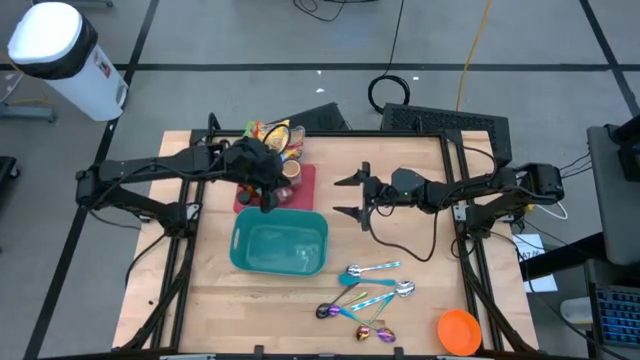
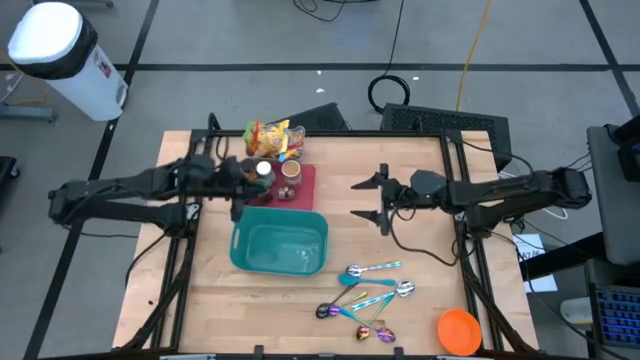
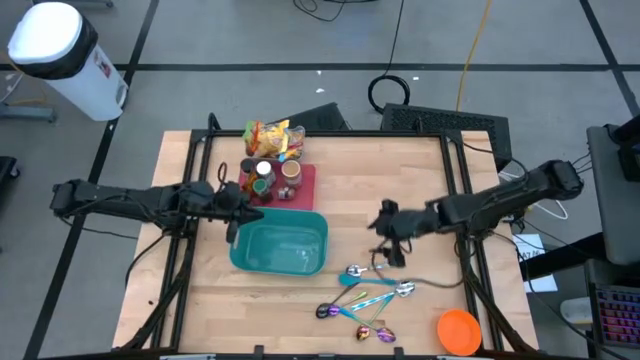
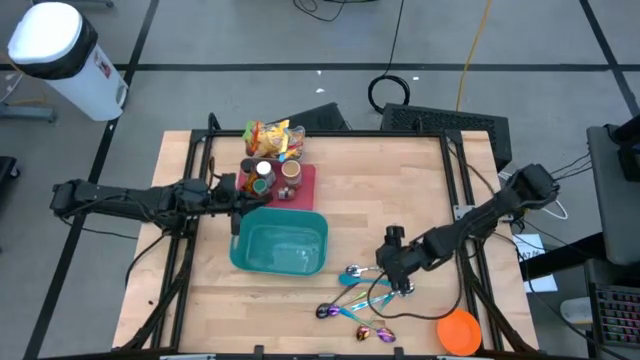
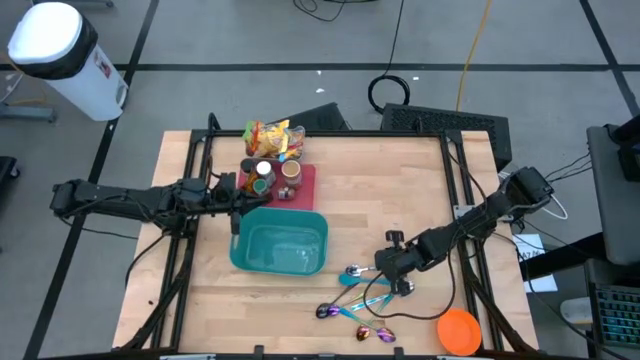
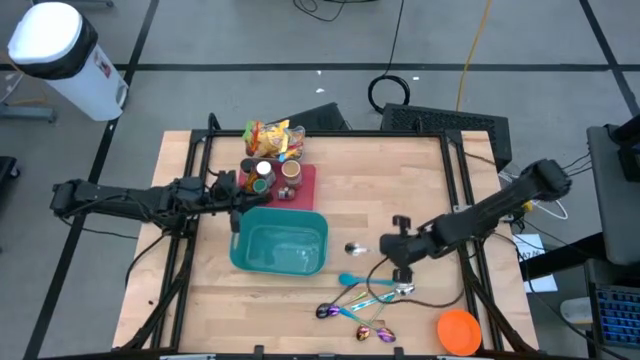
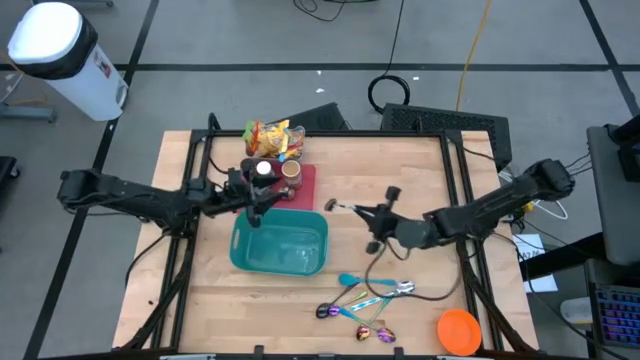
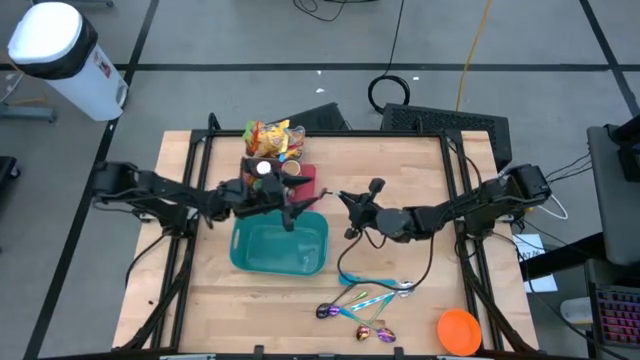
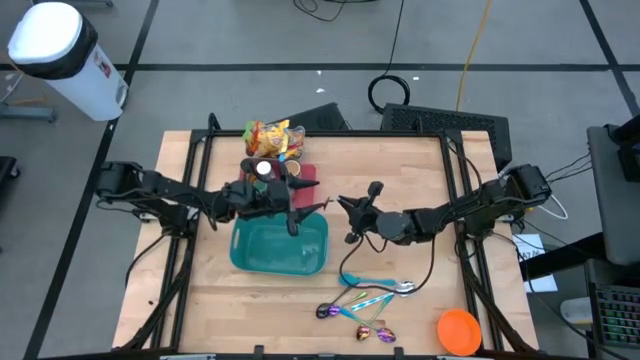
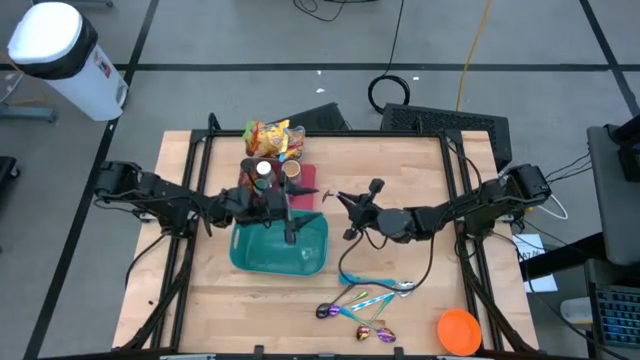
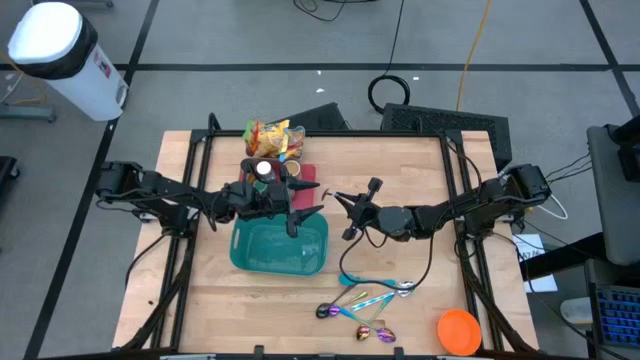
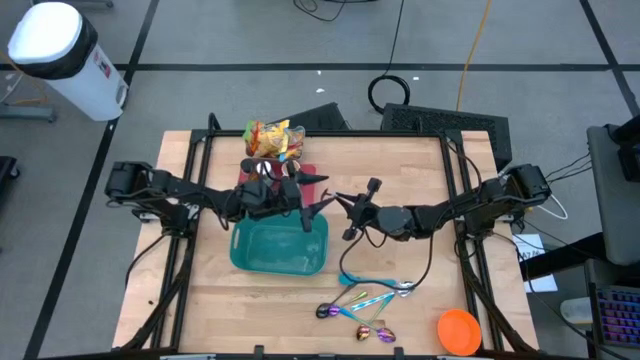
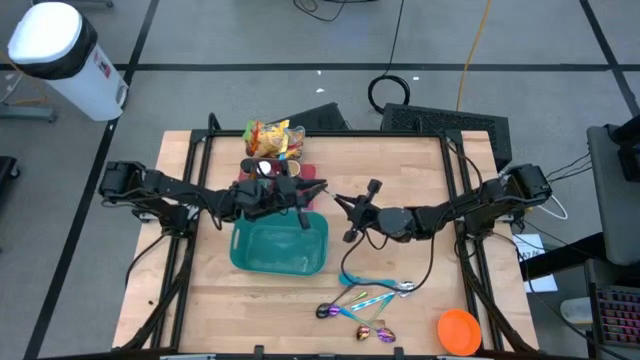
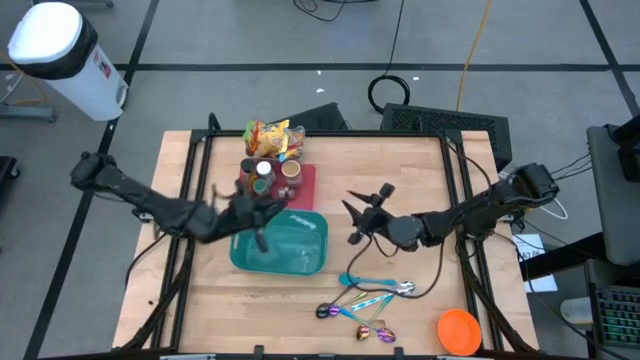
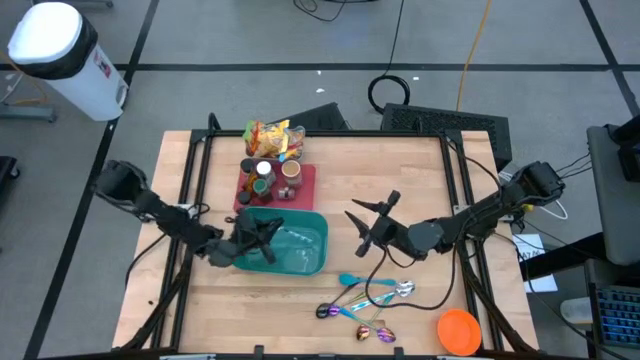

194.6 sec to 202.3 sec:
Task: Pick & Place Food Item
Put the top white and blue spoon into the blue bin

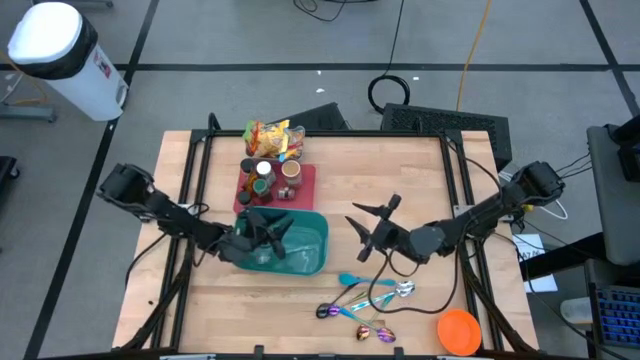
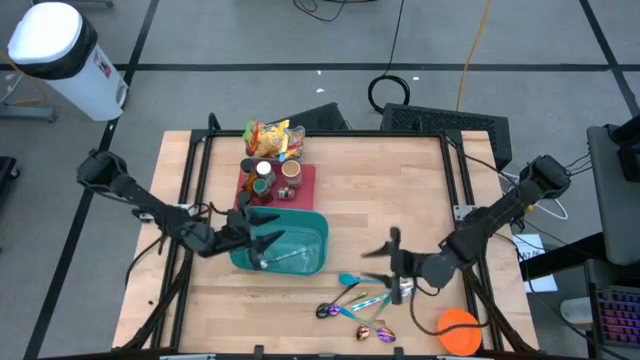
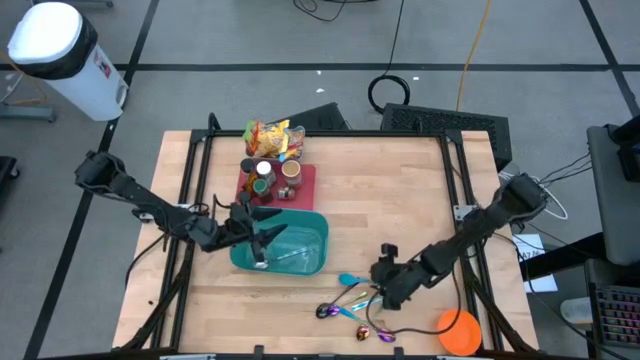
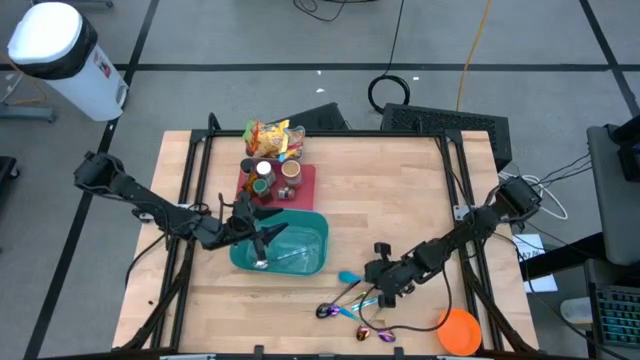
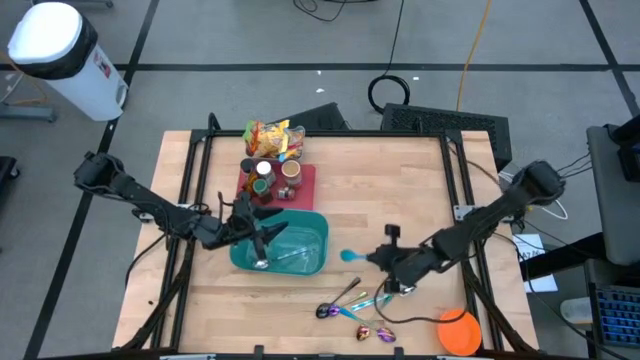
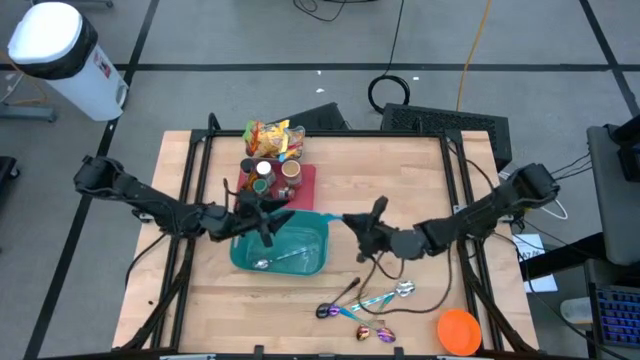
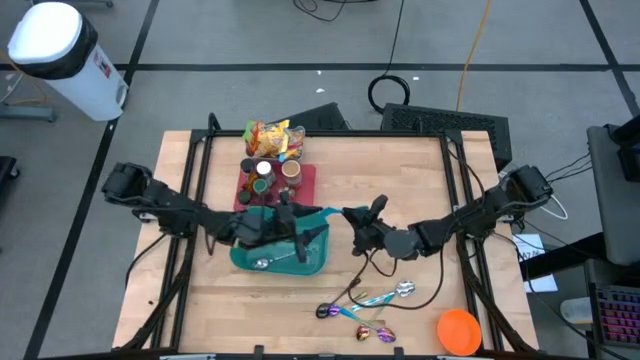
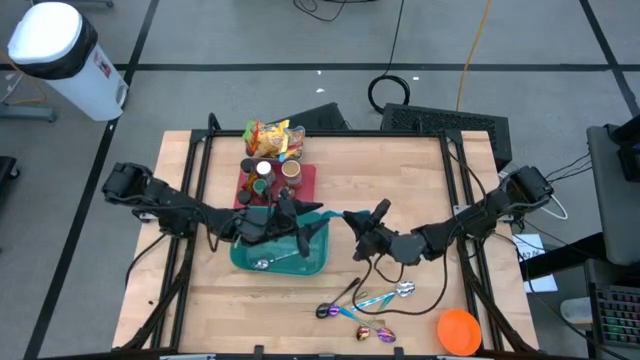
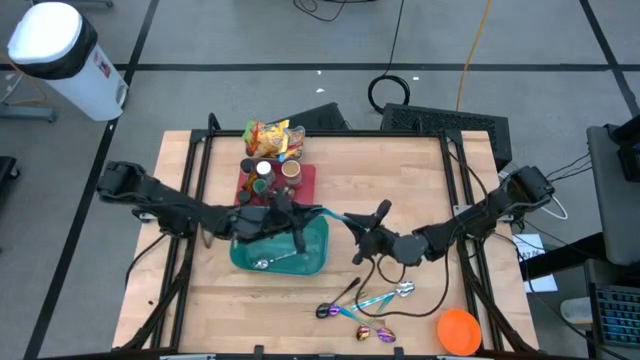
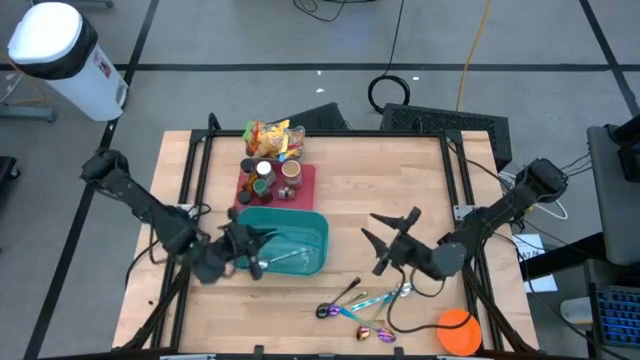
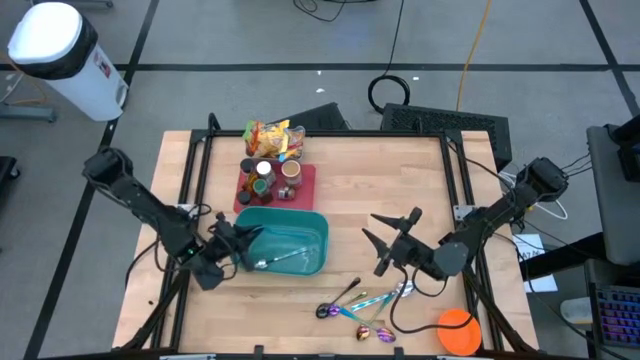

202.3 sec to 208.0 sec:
Put the blue baby spoon into the blue bin

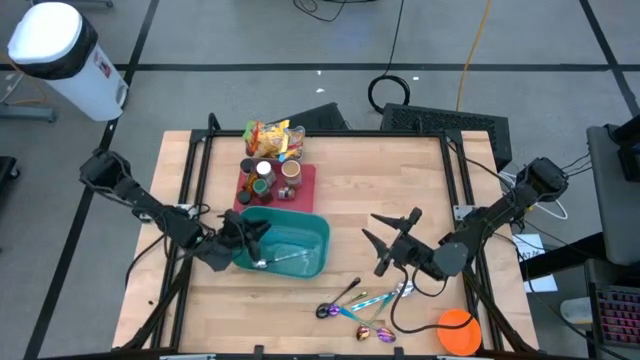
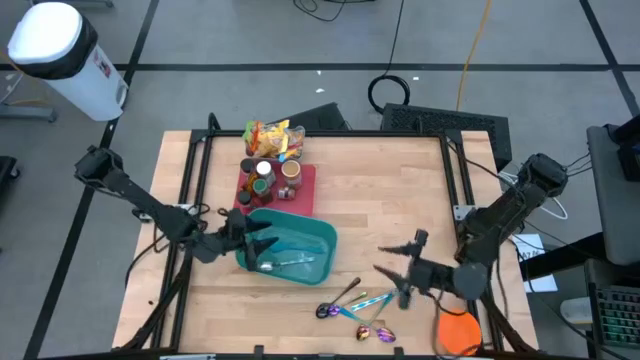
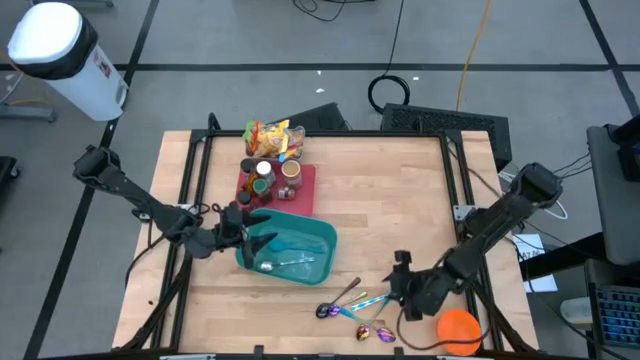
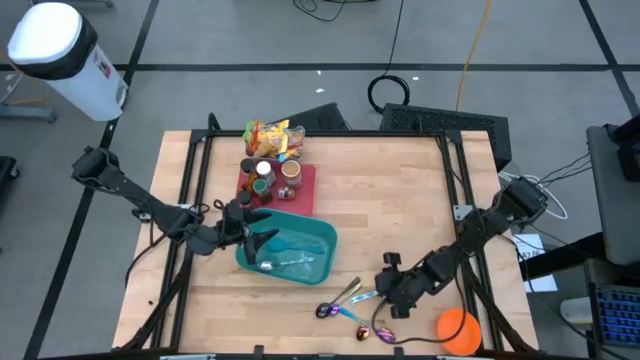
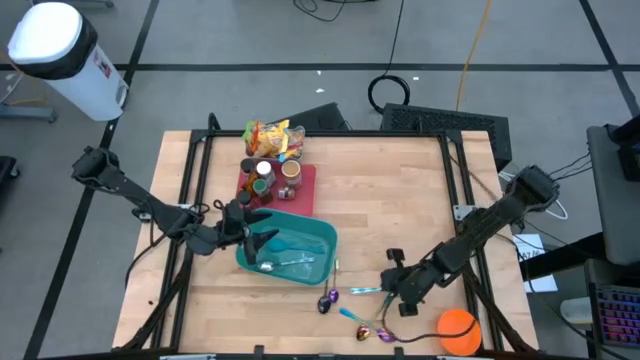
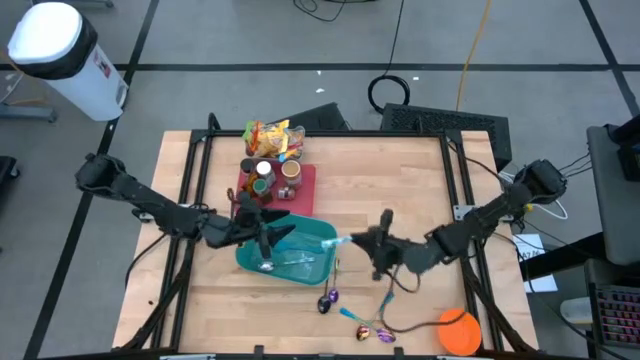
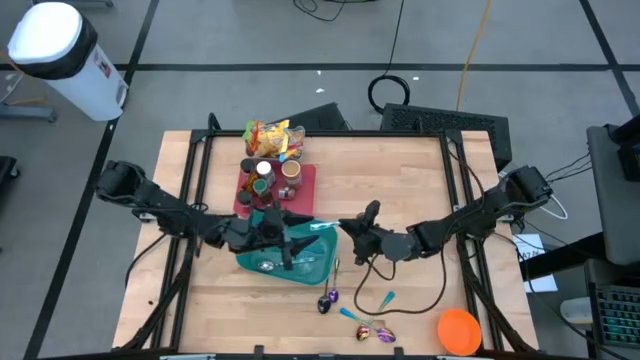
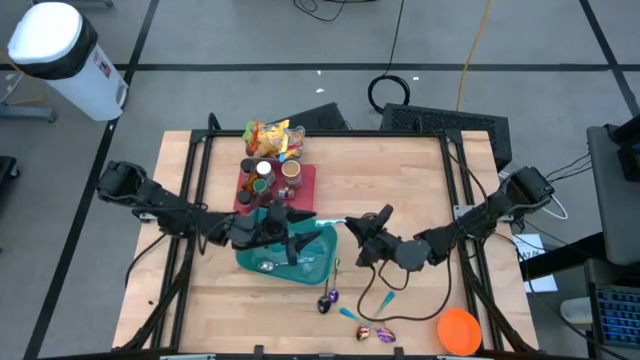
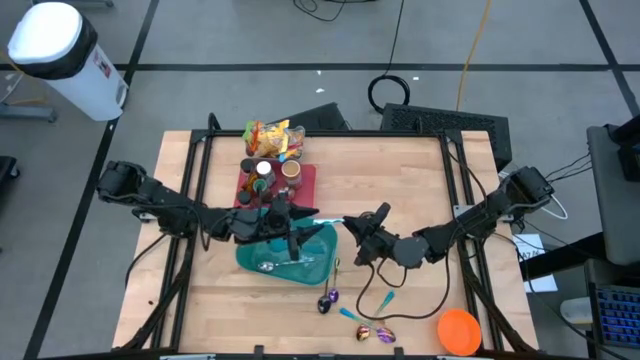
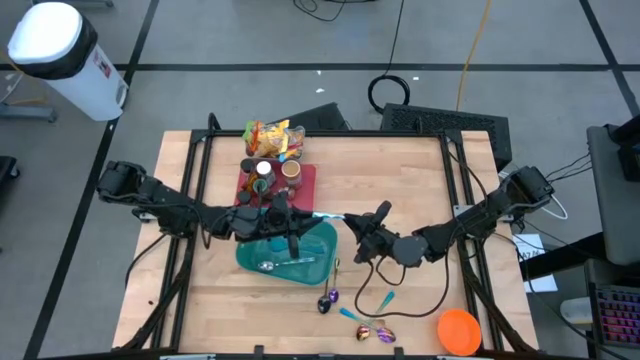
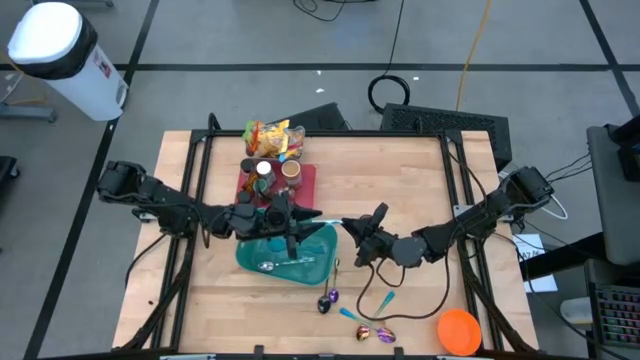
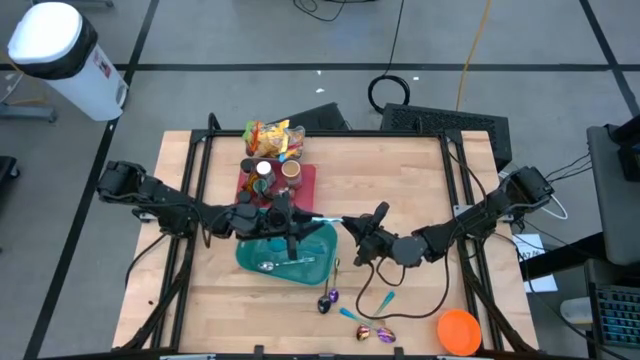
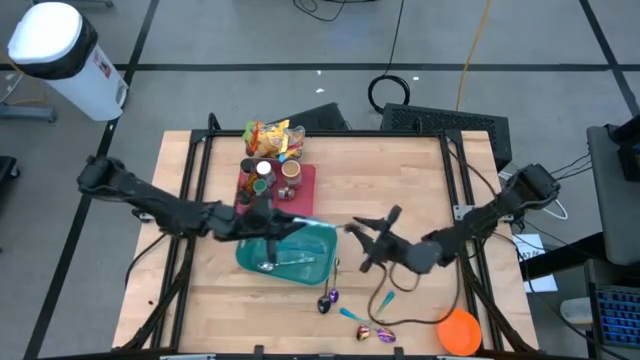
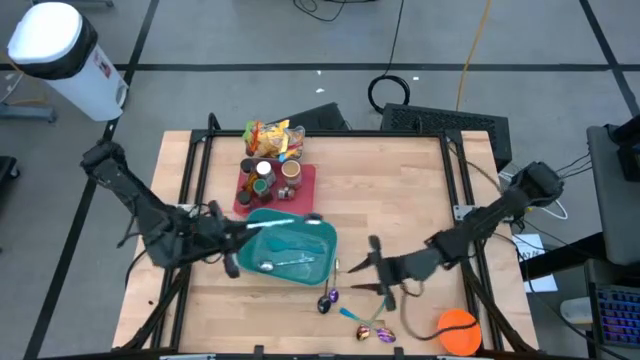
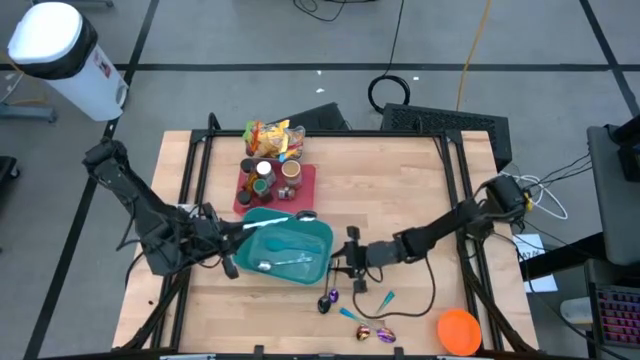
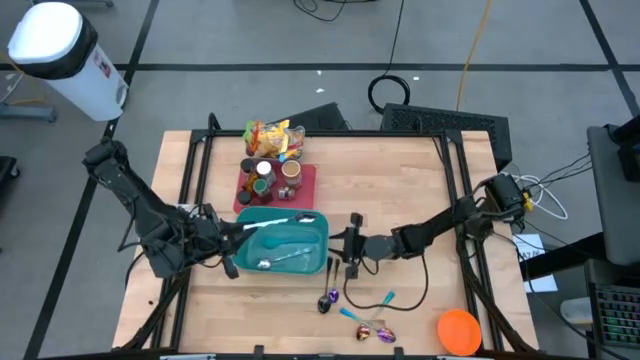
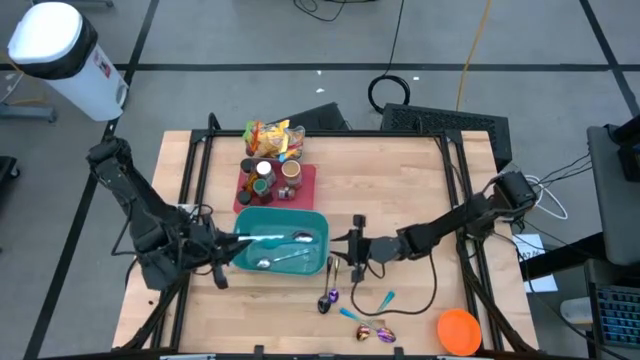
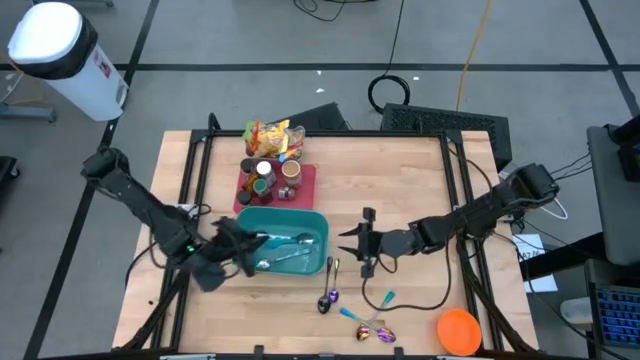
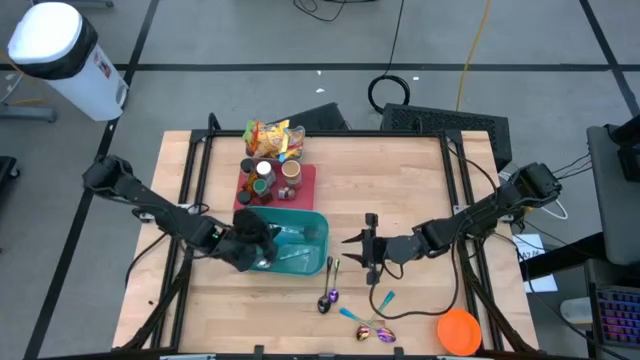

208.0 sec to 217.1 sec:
Put the white and blue spoon into the blue bin
